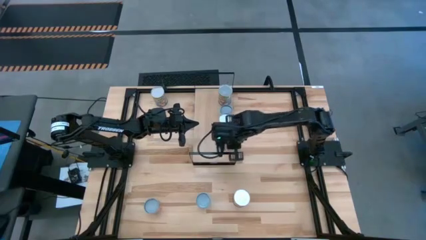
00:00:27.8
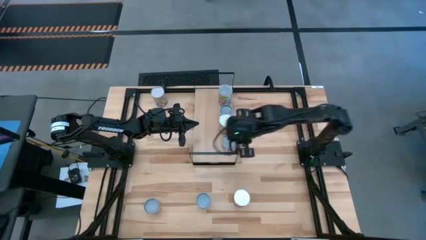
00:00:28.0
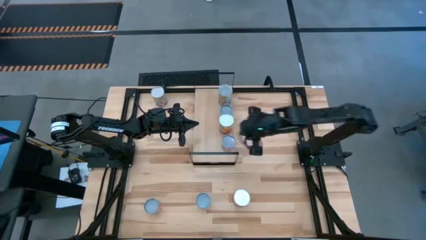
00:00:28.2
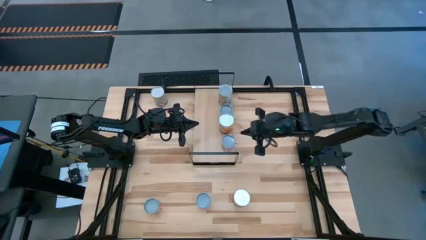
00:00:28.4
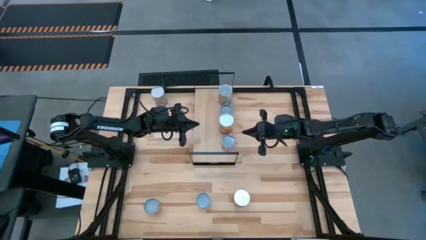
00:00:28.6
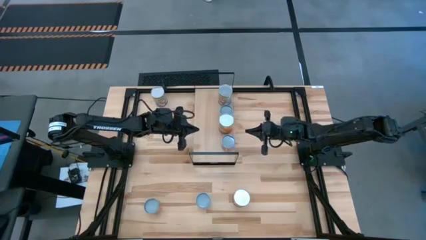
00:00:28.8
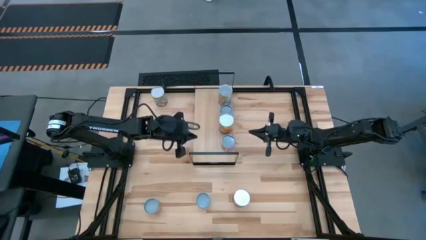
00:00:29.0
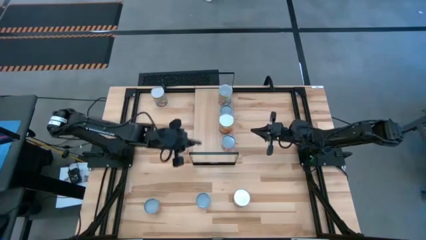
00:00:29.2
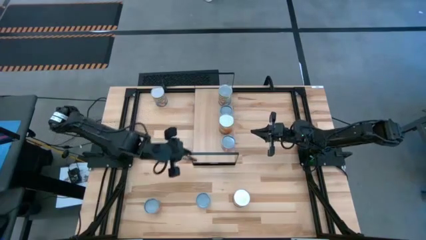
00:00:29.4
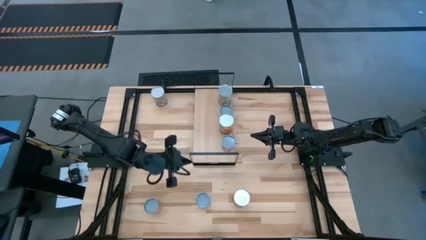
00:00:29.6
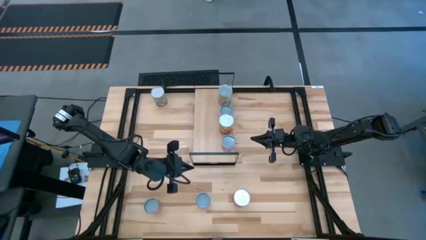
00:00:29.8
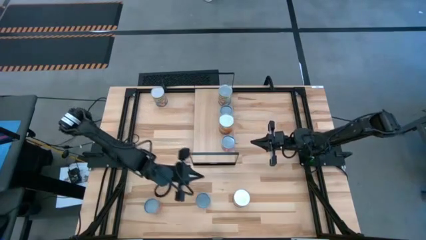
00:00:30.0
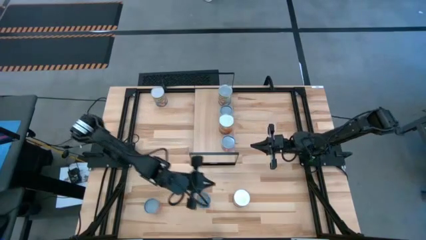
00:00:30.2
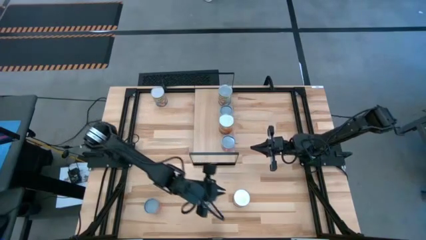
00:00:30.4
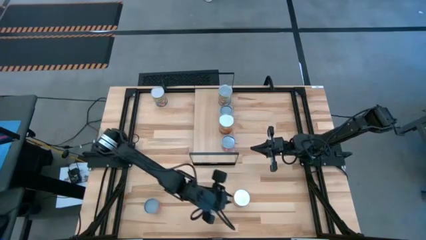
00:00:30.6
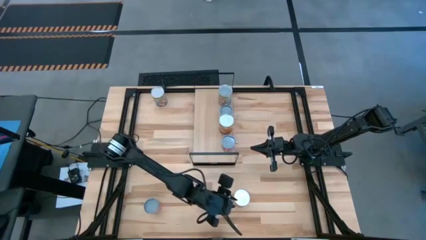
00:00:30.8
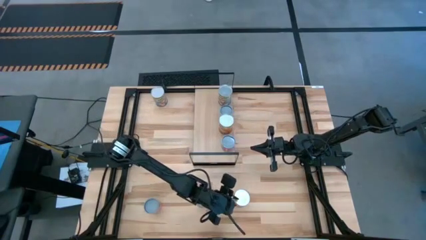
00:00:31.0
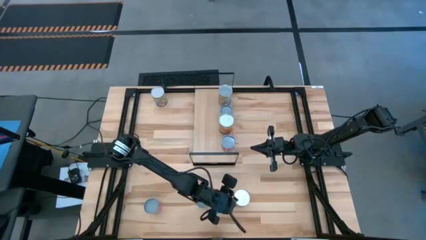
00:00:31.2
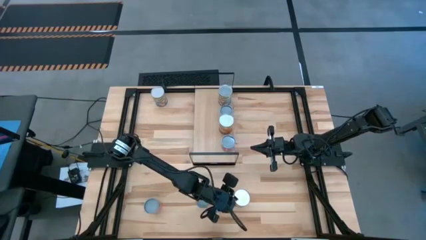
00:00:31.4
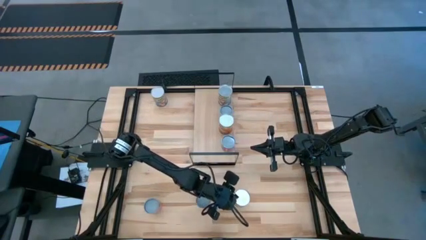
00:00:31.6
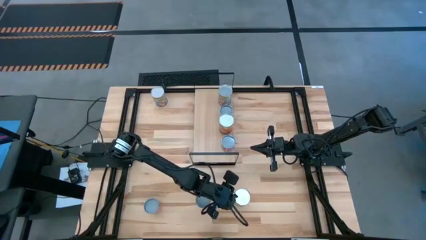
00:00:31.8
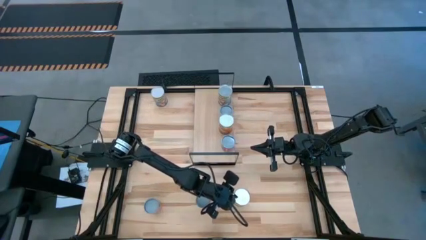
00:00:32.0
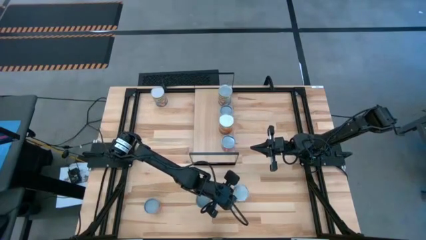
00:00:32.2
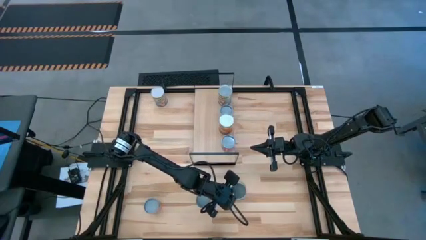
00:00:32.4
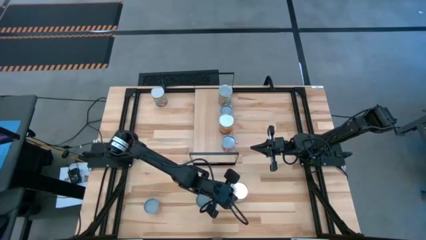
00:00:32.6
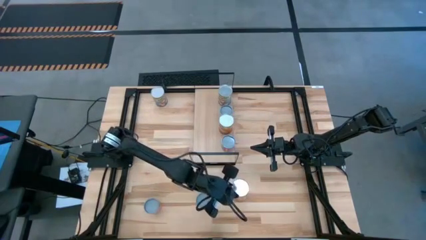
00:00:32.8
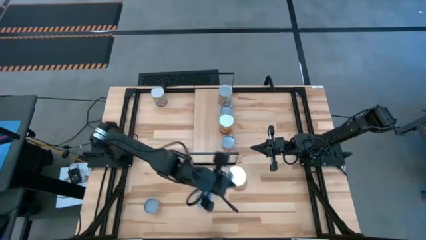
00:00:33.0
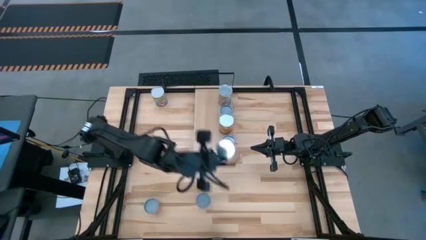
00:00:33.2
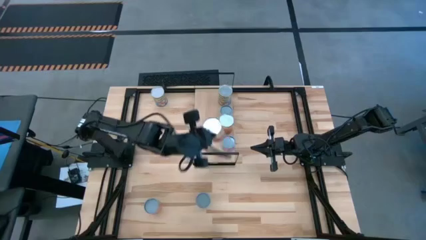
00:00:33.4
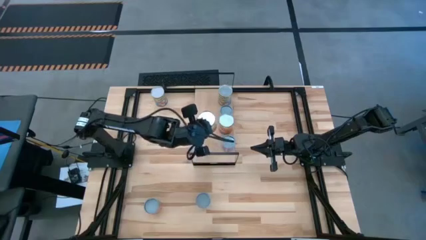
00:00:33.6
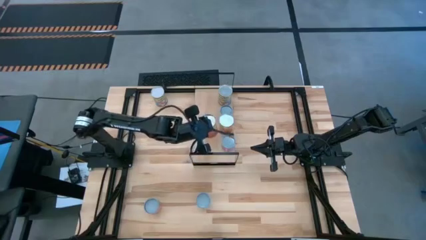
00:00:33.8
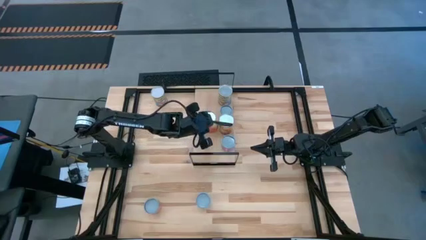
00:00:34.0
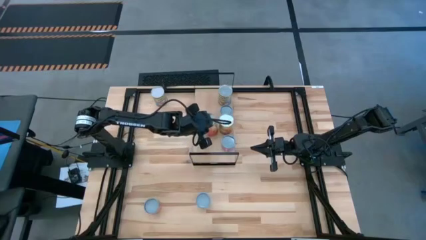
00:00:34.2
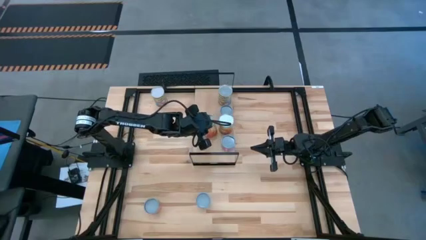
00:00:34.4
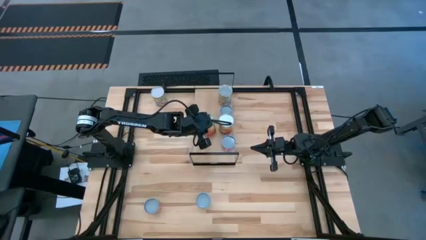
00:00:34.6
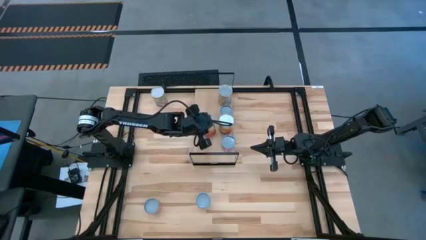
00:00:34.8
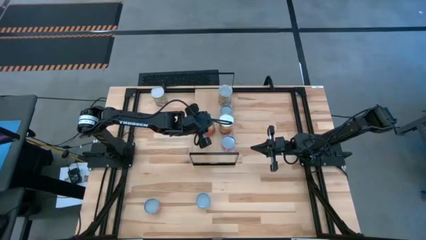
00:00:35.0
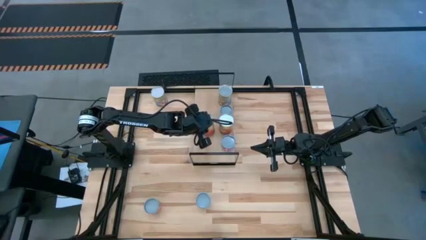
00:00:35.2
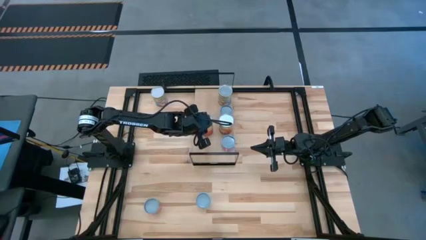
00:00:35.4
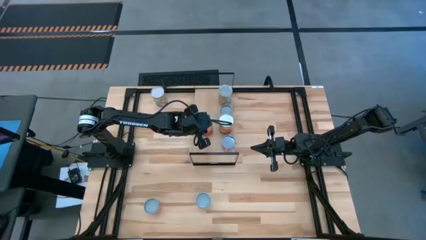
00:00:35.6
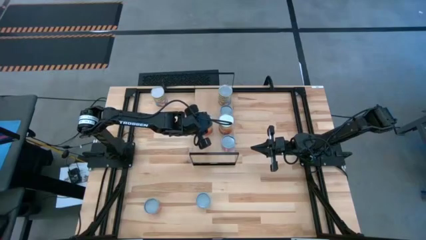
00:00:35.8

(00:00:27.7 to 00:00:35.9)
Task: Pick and place cans onto a shelf
Put the canned corn on the shelf

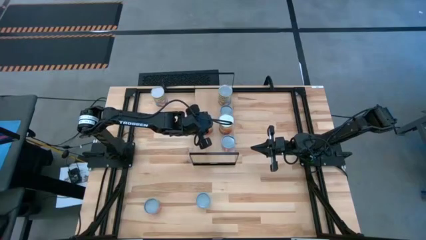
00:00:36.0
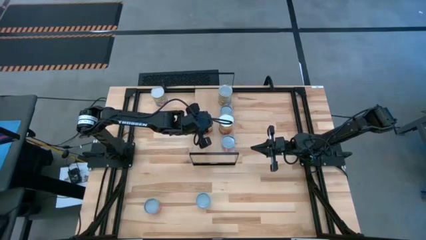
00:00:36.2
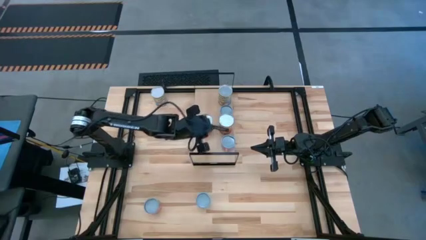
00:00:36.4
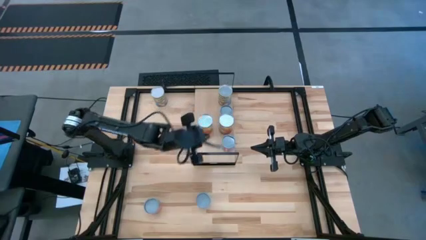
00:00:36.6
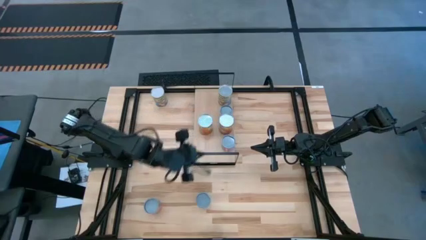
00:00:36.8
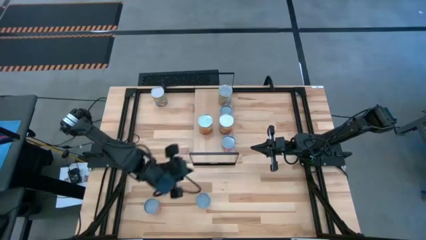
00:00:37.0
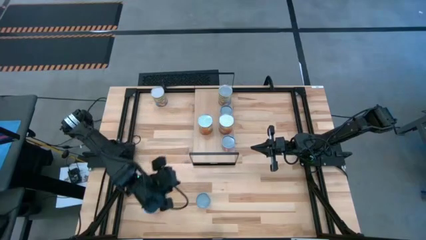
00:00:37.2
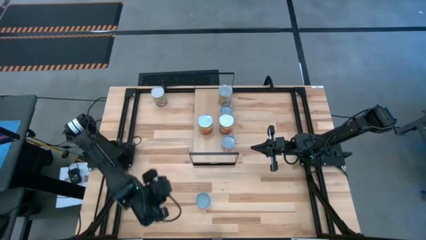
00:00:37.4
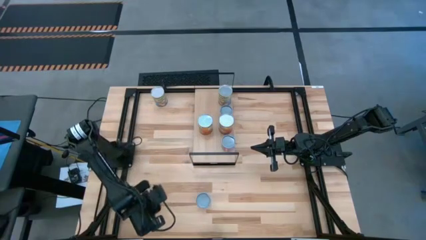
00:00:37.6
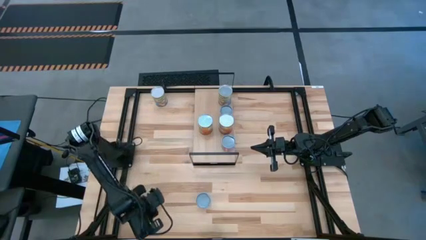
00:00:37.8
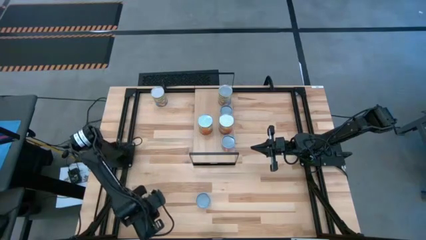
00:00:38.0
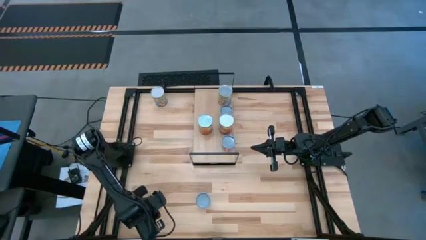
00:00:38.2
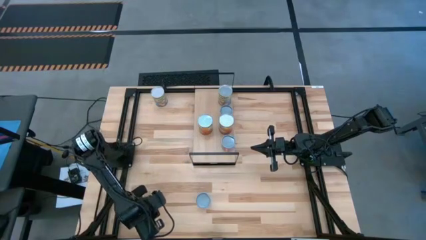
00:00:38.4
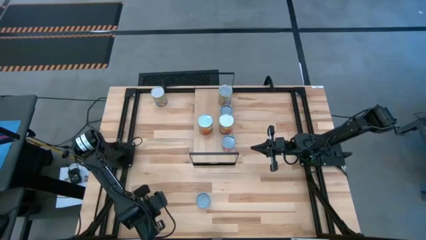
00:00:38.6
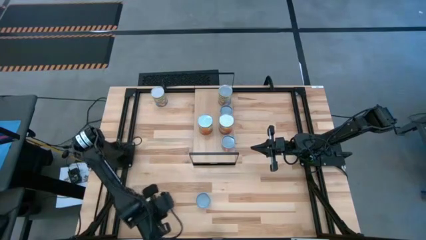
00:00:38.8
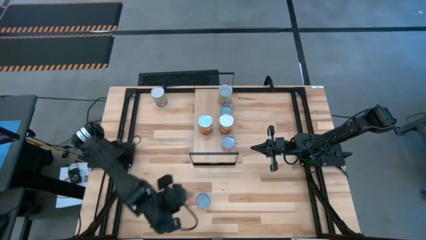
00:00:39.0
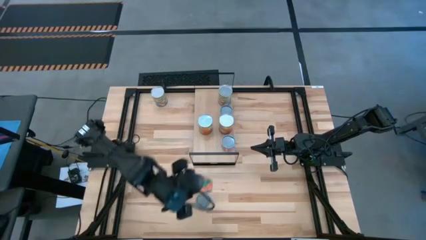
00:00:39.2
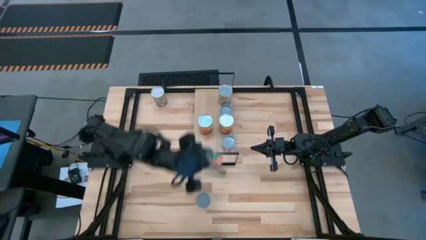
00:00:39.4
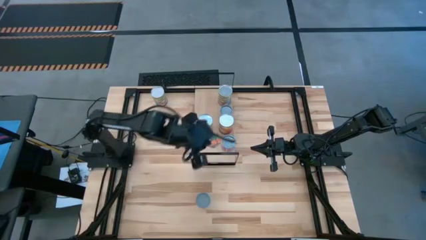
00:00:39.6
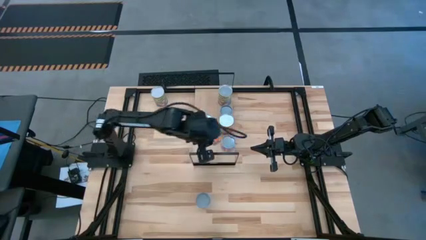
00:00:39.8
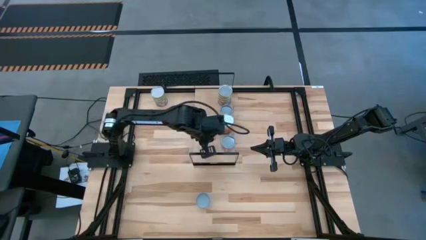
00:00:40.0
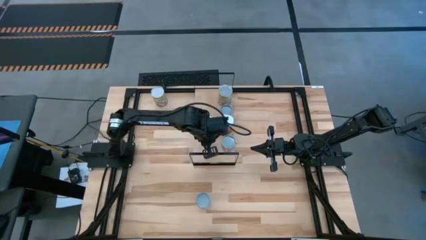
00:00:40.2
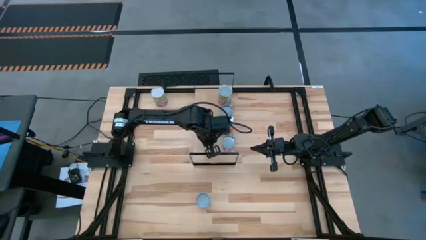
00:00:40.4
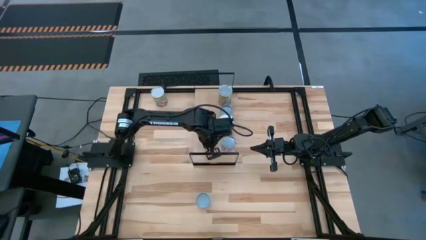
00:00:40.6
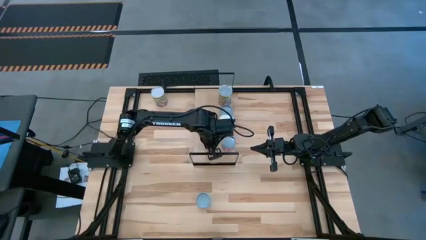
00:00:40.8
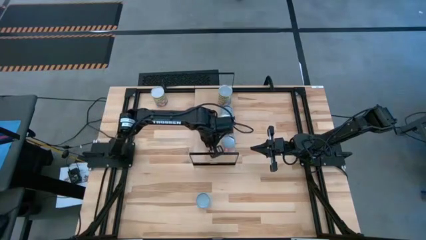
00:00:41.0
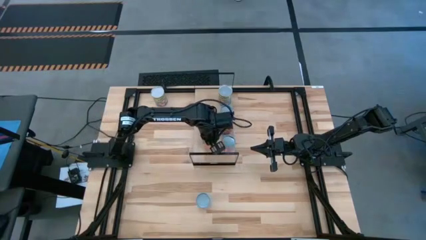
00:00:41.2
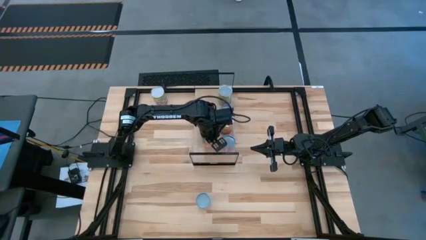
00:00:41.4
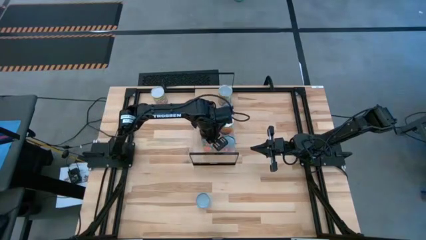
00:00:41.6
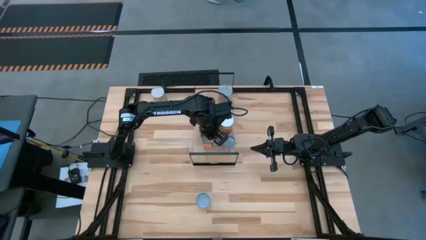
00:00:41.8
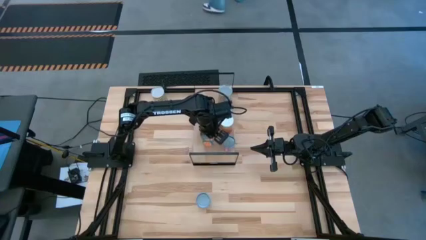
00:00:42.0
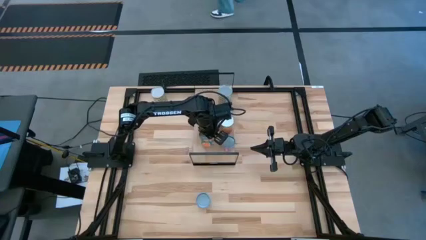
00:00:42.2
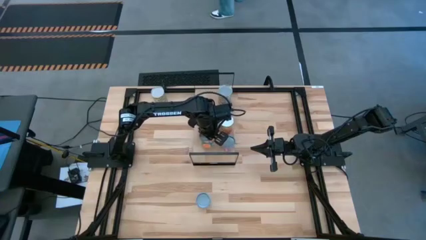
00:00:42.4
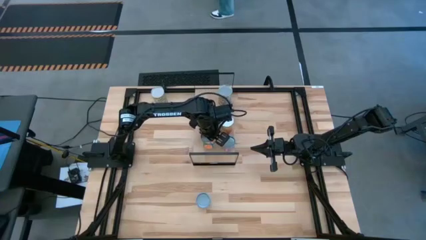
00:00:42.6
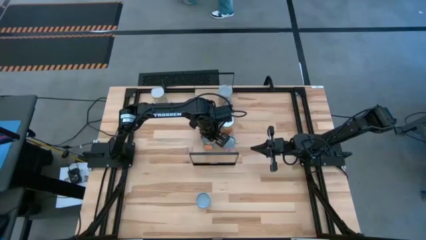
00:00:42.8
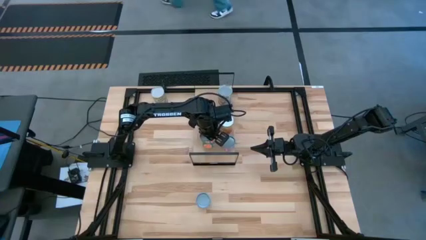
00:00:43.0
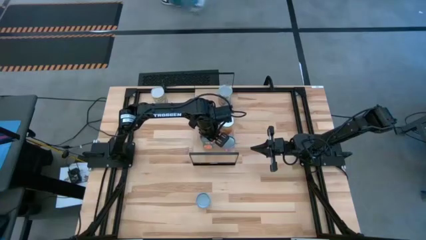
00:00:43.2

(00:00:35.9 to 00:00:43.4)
Put the canned oranges on the shelf

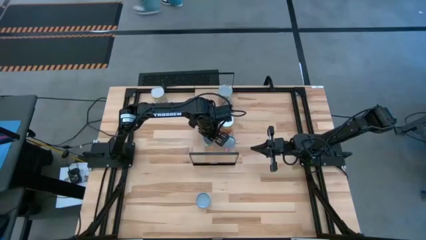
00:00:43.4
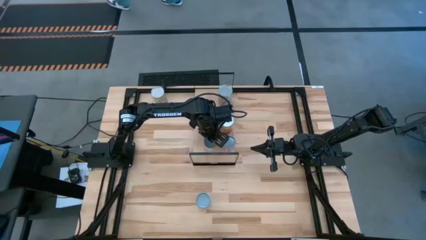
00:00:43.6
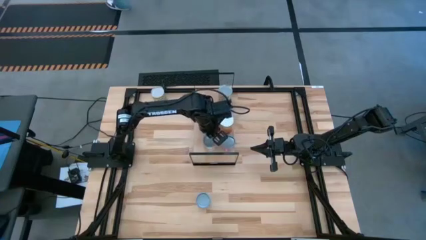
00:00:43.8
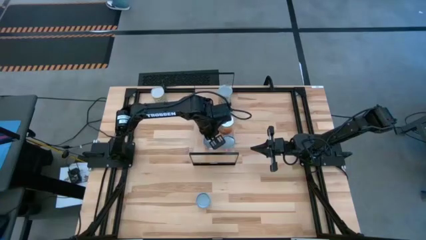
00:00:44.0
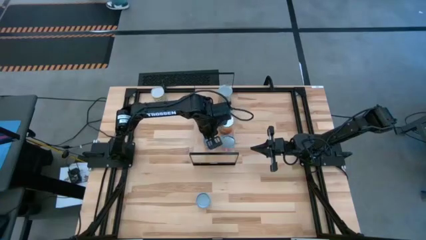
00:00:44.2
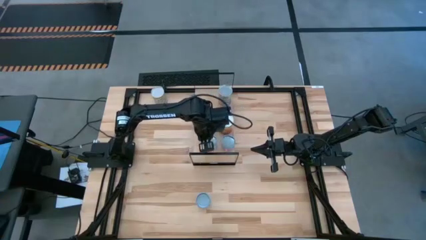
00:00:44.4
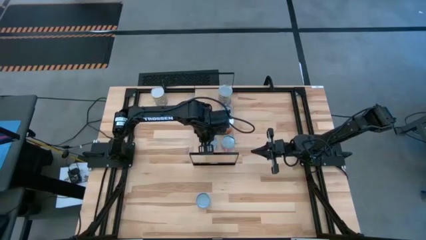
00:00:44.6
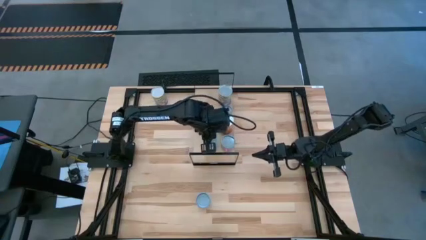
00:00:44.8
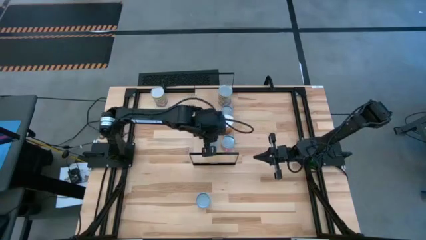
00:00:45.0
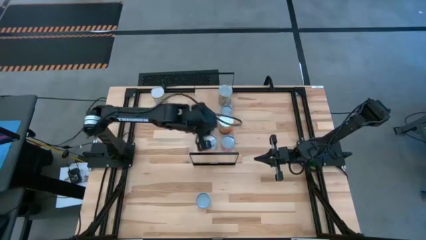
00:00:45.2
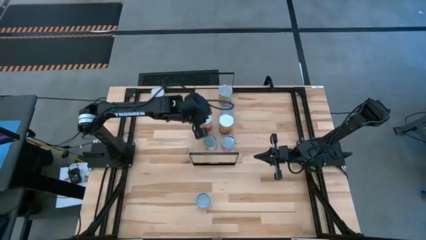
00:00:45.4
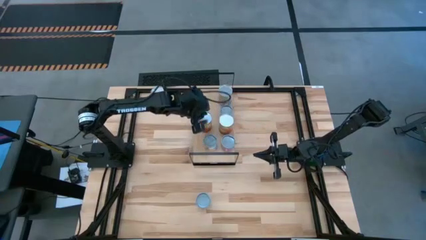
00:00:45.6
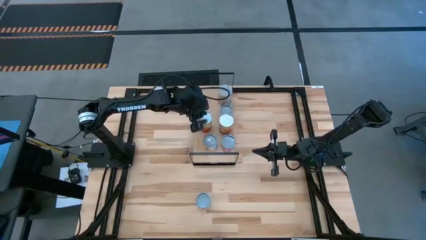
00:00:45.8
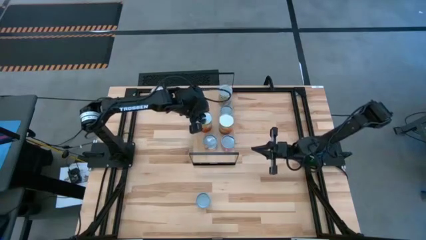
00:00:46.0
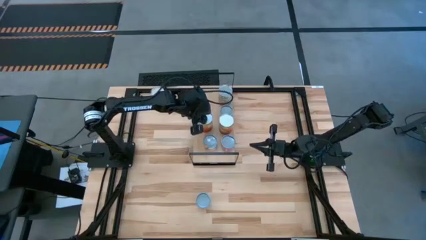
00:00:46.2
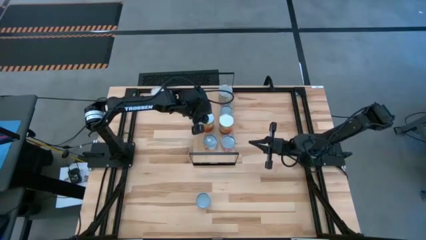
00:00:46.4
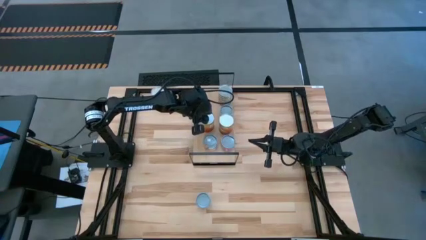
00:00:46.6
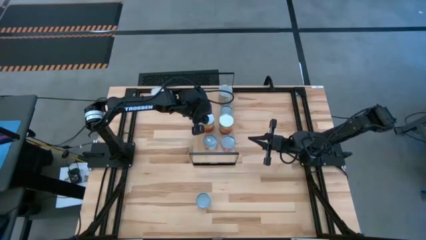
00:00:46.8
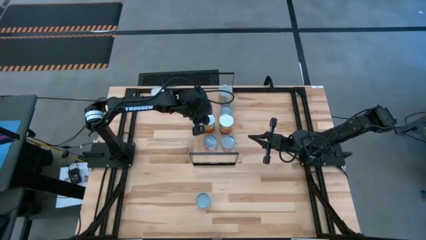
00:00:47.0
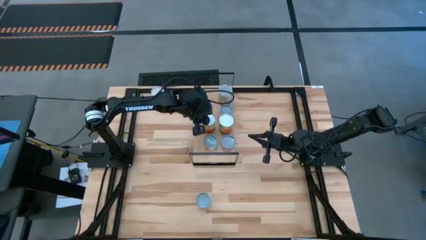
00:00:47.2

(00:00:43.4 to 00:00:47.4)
Adjust the canned corn on the shelf
